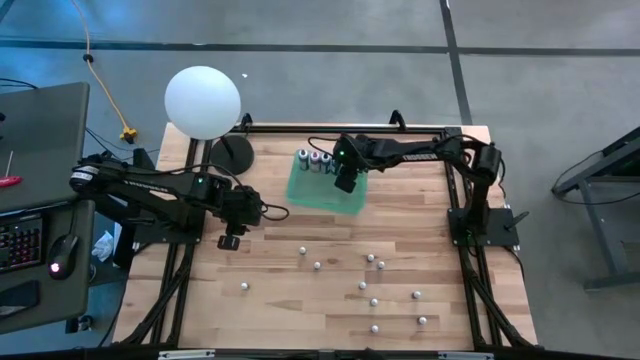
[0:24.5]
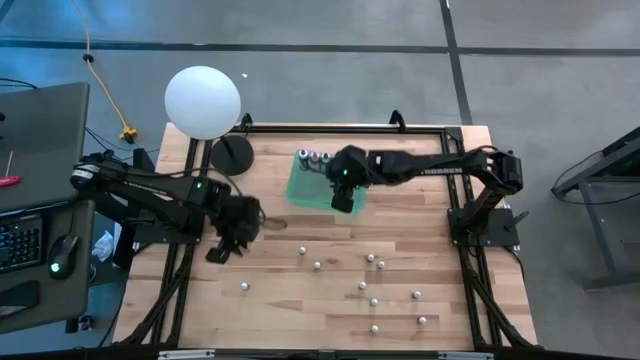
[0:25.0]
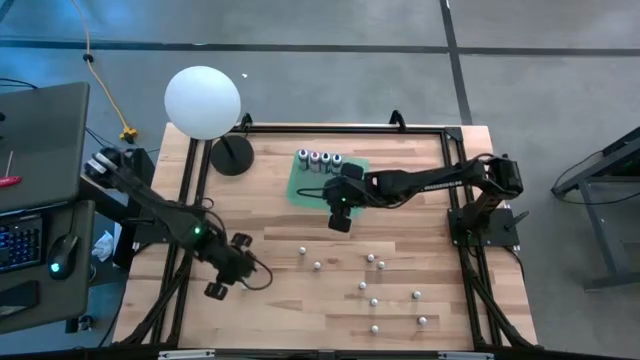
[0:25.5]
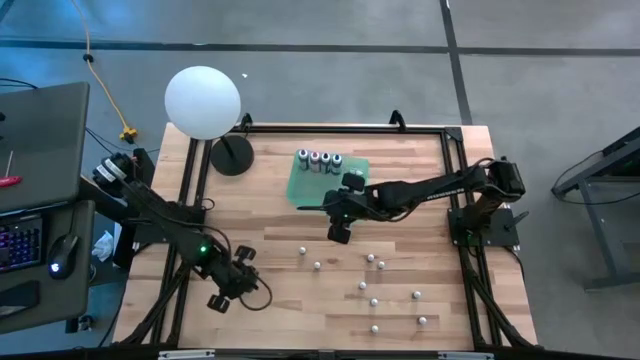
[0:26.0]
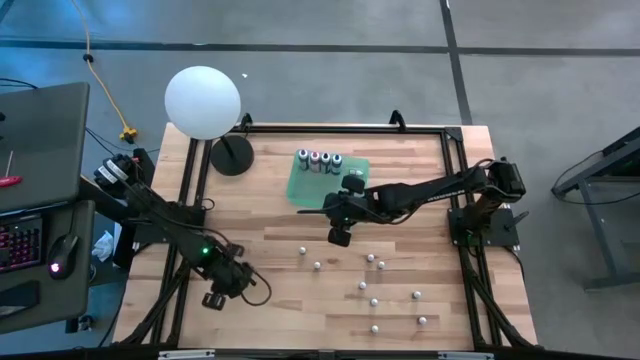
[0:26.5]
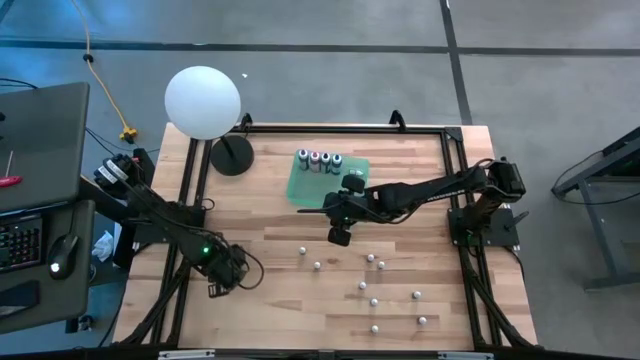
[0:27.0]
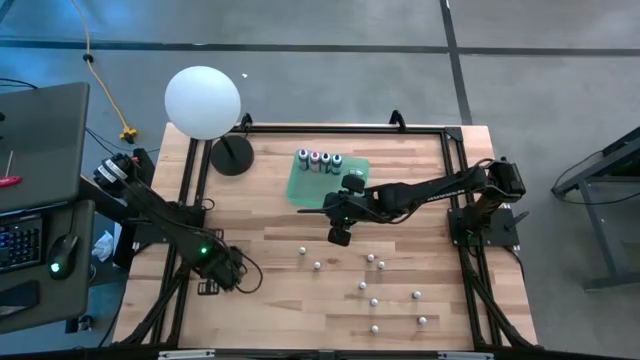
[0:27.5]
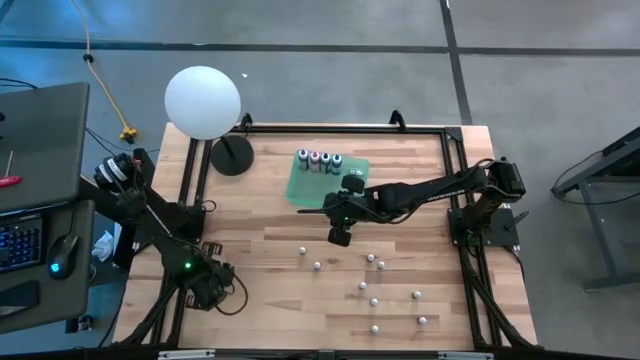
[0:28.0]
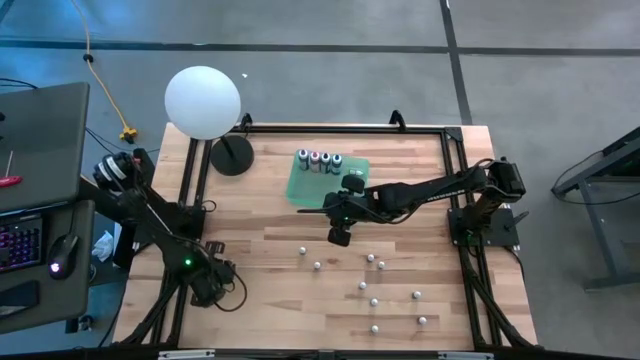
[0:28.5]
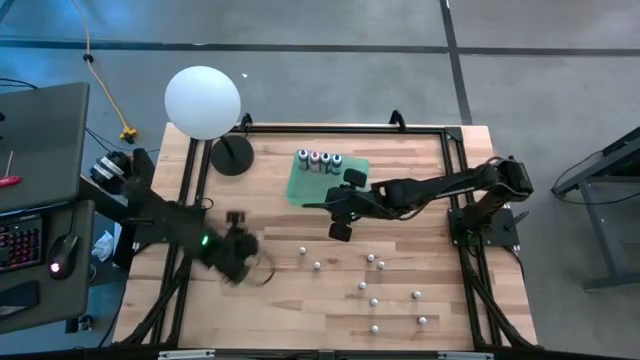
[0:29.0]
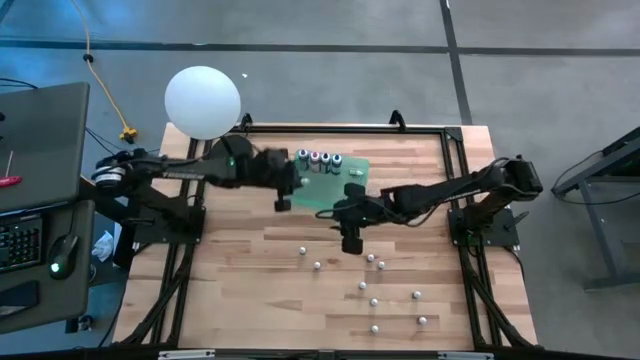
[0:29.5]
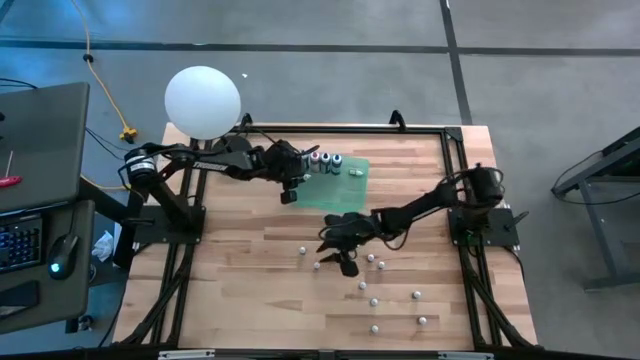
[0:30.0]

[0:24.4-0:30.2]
Task: Pick & Place food coloring
Put the top green food coloring bottle into the bin

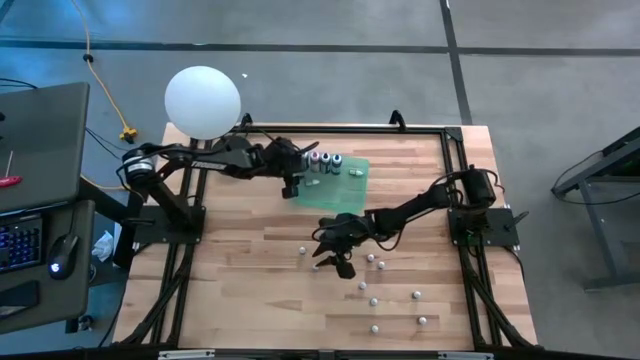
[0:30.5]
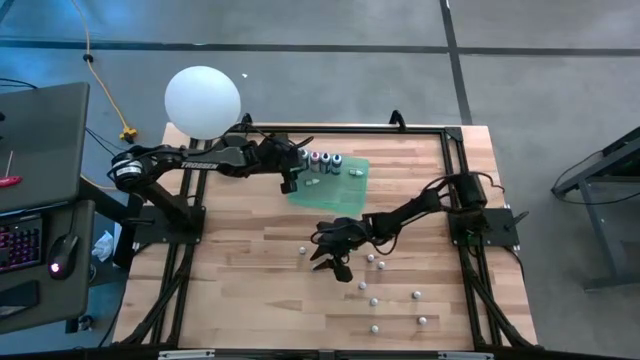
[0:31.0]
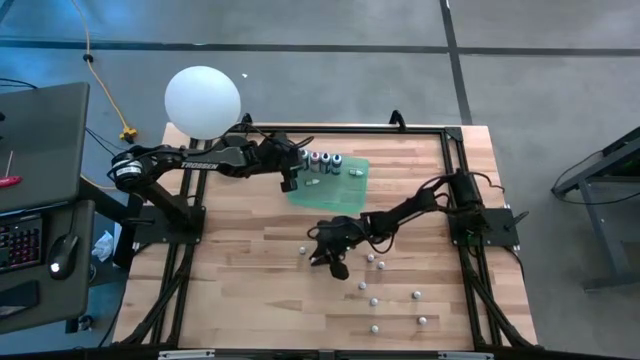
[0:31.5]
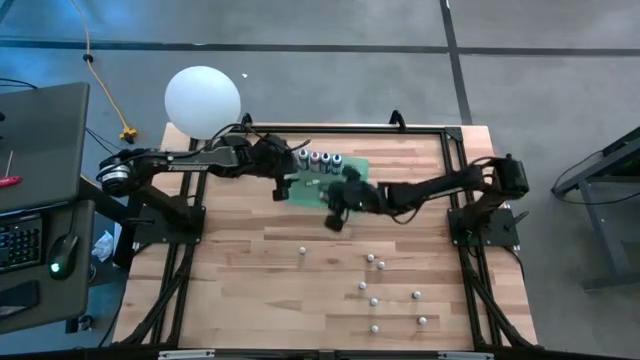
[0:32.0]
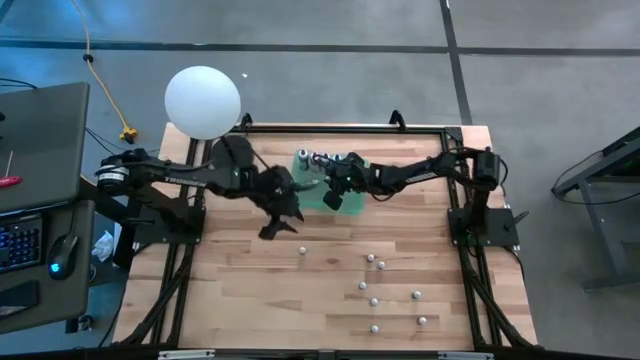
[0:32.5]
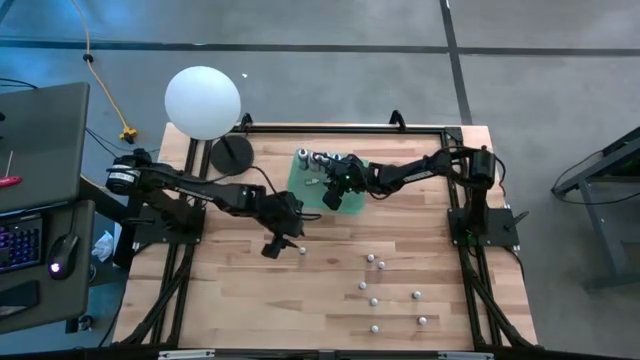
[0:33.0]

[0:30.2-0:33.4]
Put the black food coloring bottle into the bin

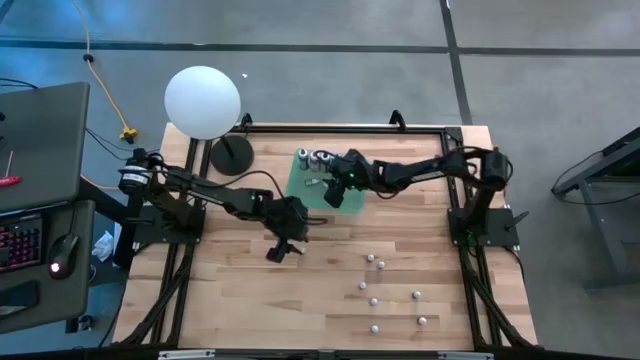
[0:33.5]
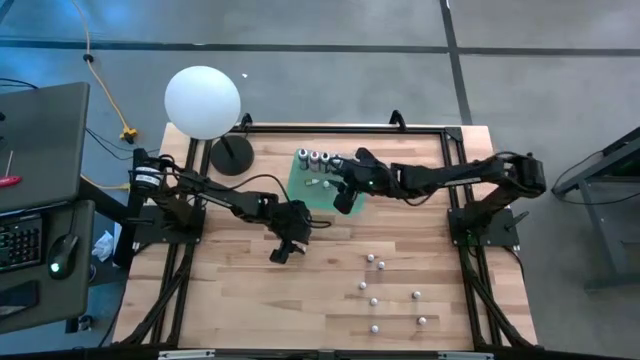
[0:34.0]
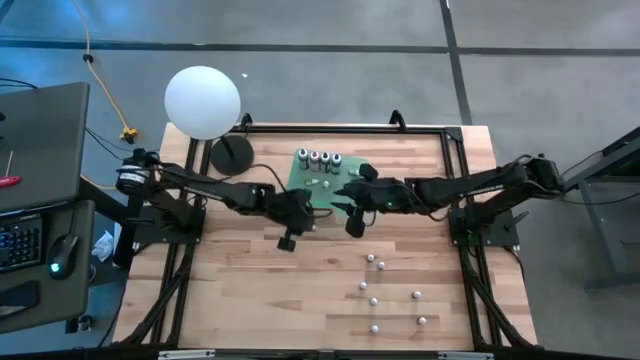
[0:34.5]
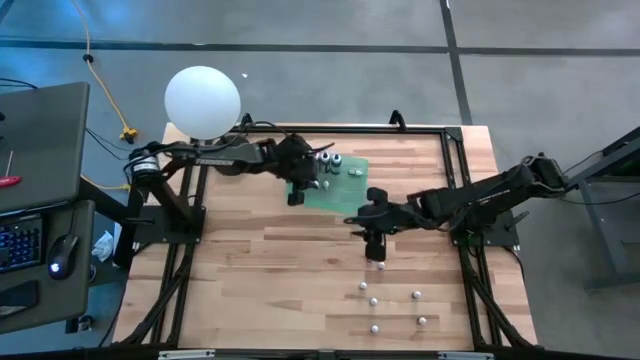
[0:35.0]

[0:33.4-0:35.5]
Put the top black food coloring bottle into the bin

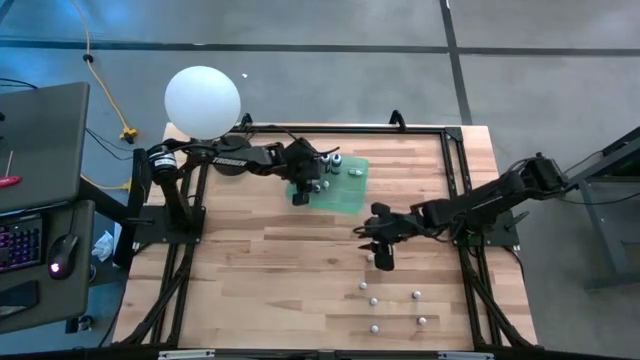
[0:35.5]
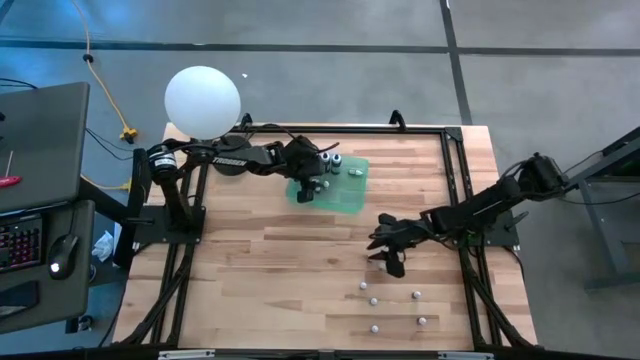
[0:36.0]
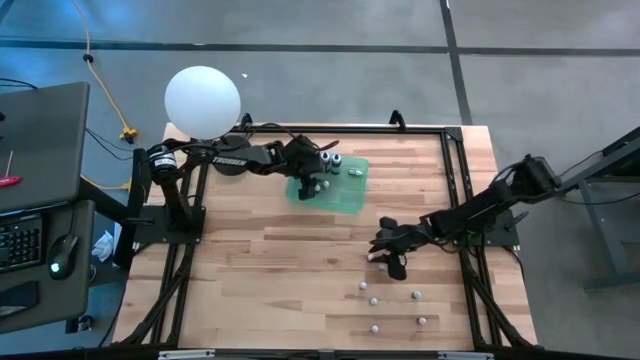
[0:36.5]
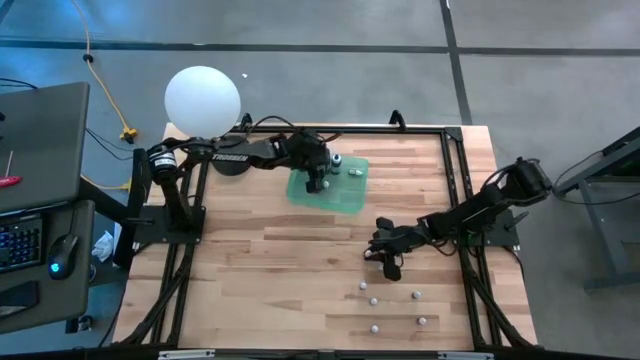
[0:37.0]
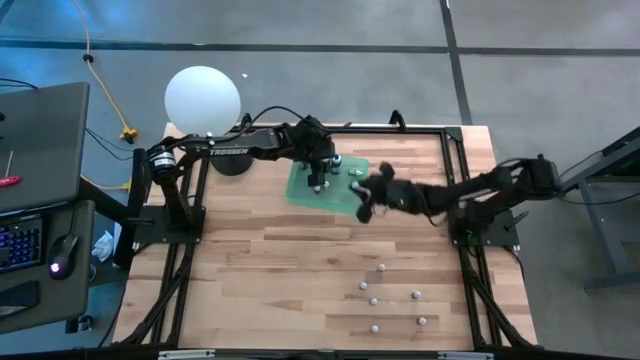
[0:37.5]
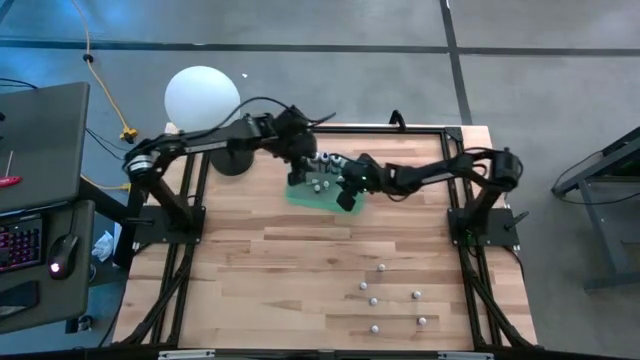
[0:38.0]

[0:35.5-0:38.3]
Put the red food coloring bottle into the bin

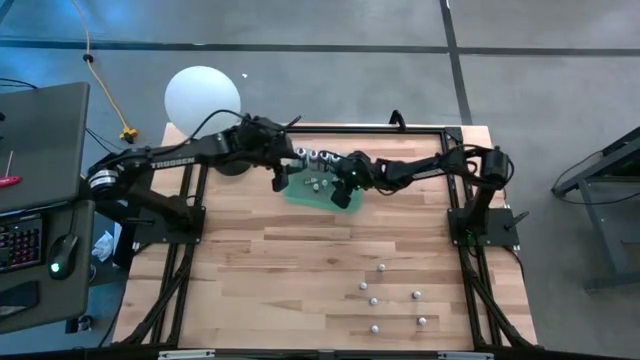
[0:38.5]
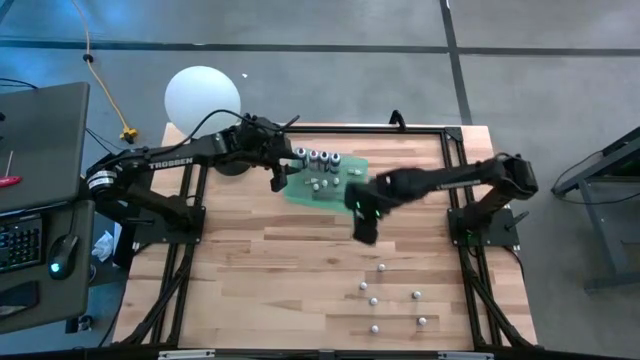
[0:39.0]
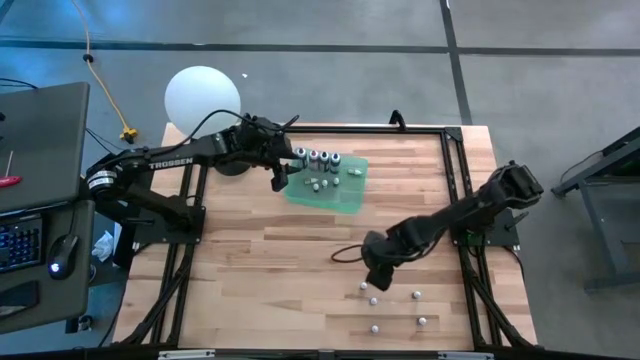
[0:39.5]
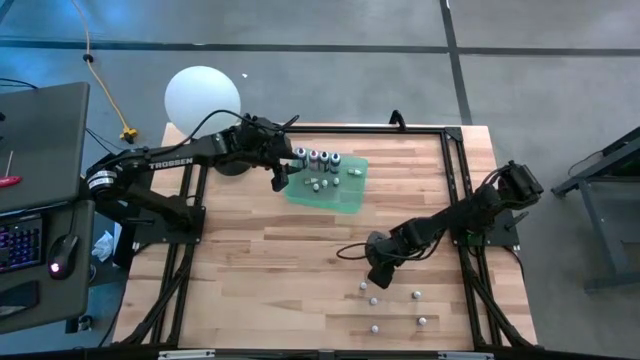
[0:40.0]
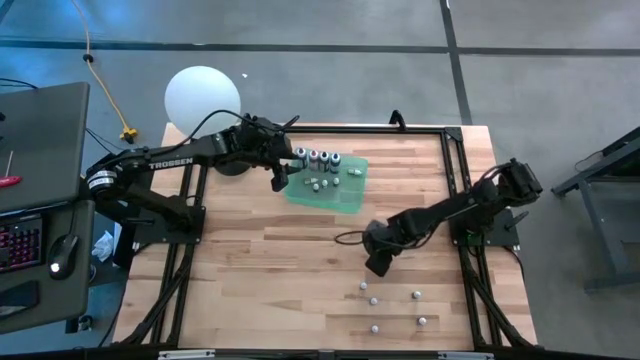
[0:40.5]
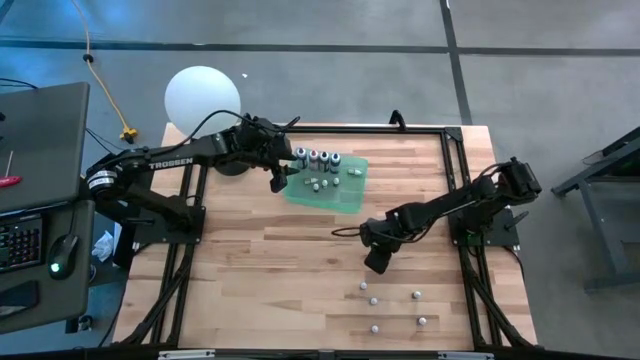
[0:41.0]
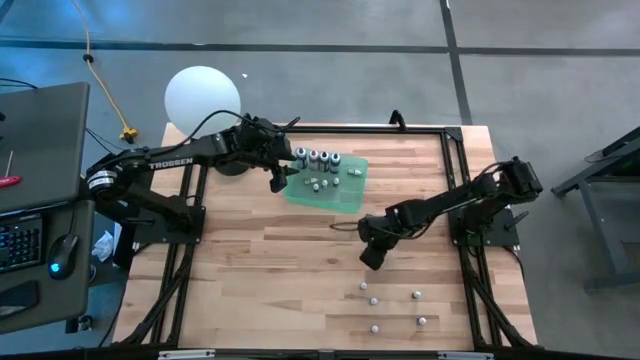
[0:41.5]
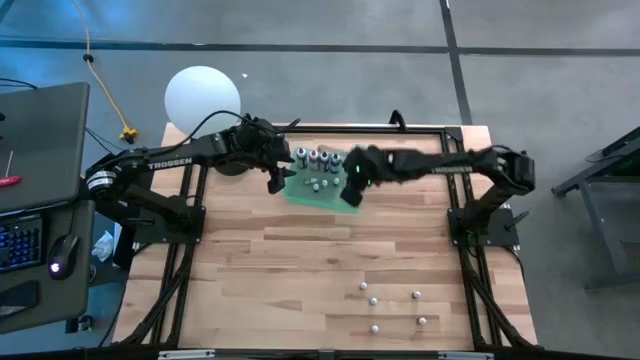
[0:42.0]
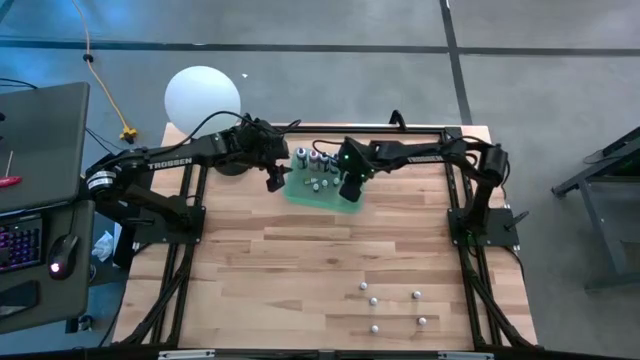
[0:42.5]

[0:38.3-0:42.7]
Put the brown food coloring bottle into the bin

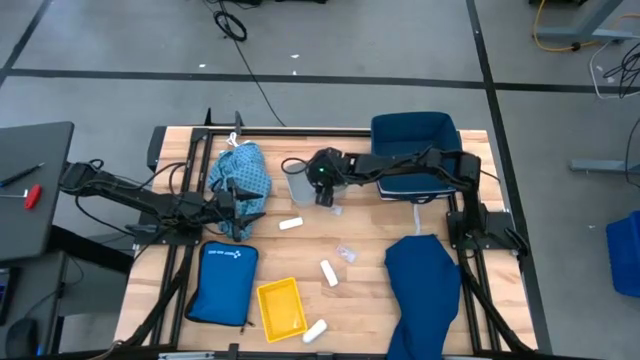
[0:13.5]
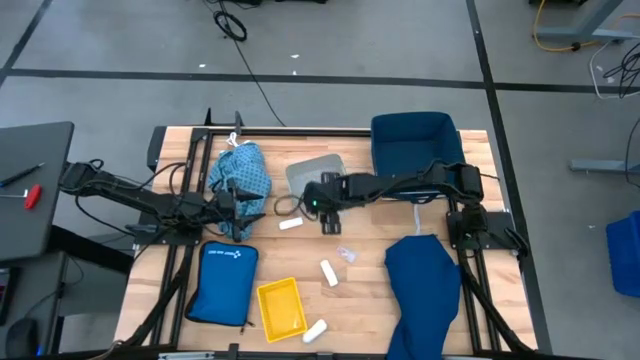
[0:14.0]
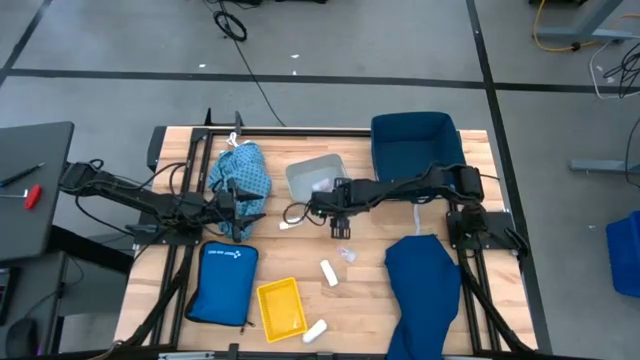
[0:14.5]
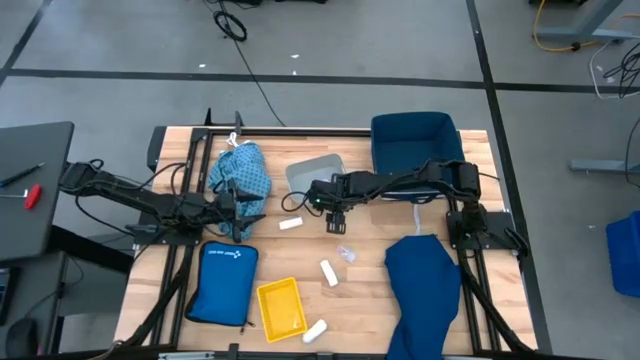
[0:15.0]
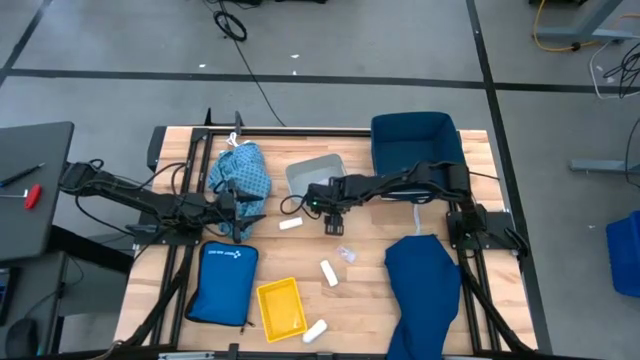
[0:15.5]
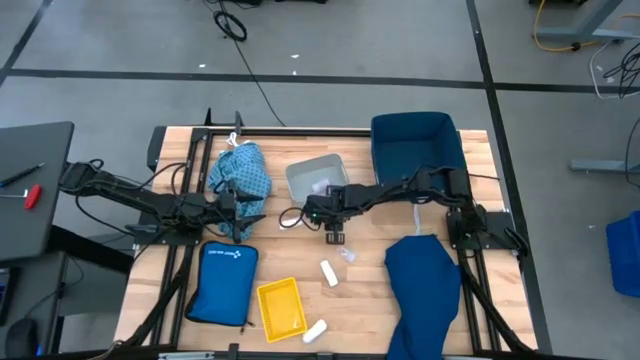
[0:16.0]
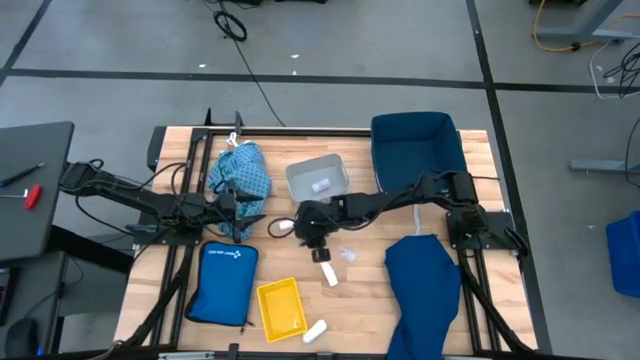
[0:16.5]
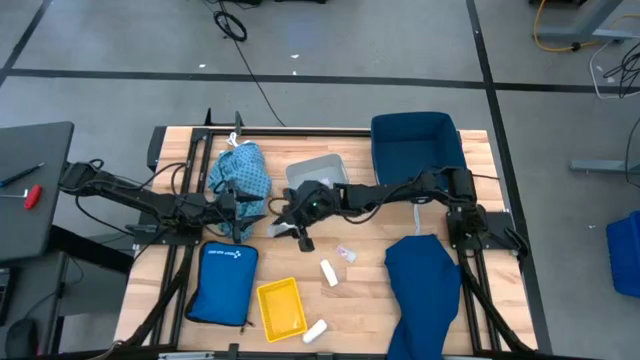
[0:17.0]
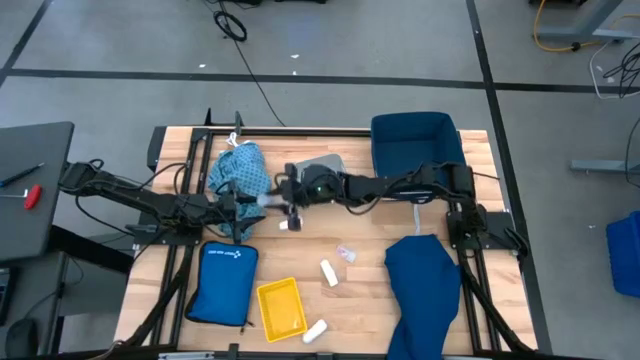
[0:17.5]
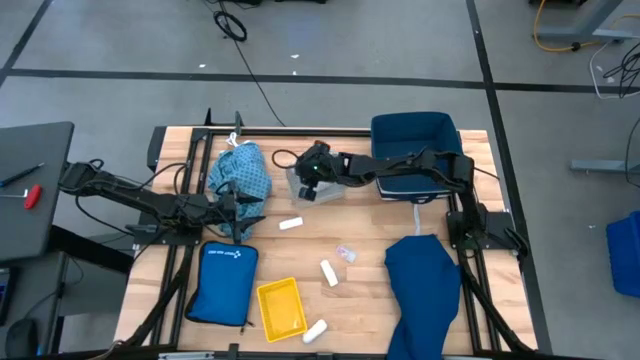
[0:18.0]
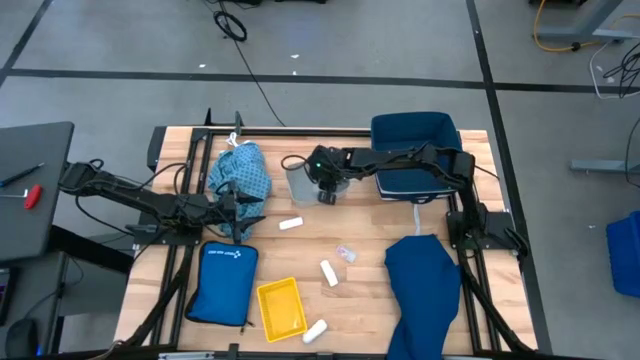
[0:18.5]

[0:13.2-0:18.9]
Task: Pick & place medical supplies in basket/bin
Put the top transparent pill bottle into the white bin
